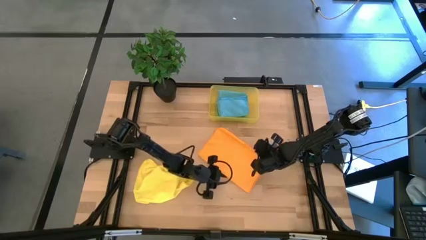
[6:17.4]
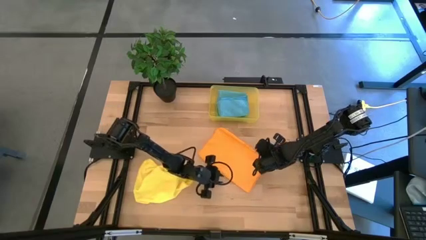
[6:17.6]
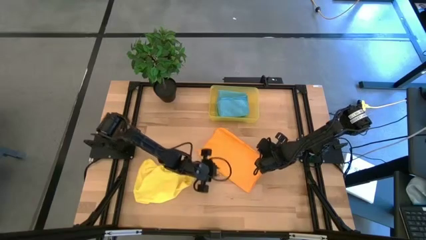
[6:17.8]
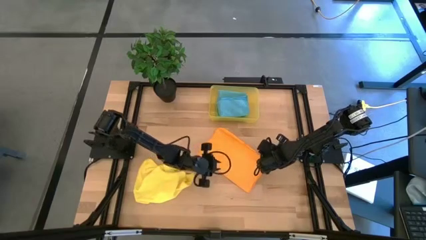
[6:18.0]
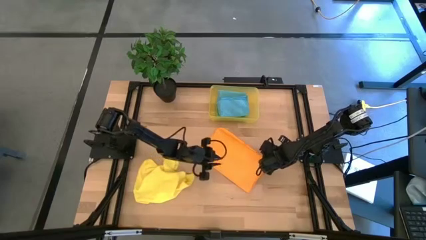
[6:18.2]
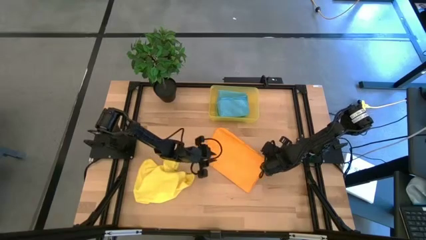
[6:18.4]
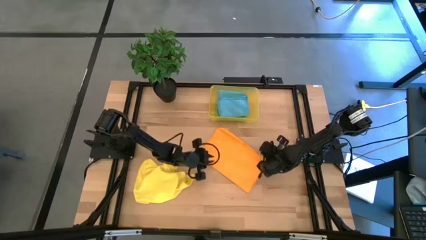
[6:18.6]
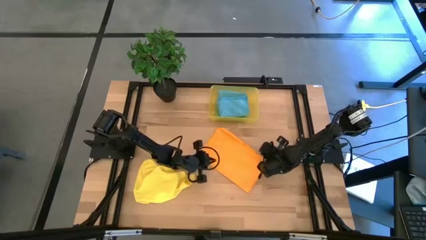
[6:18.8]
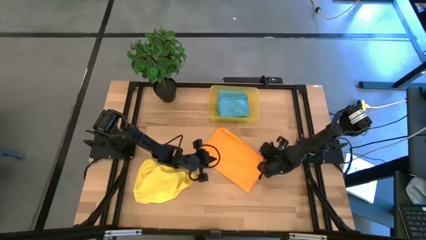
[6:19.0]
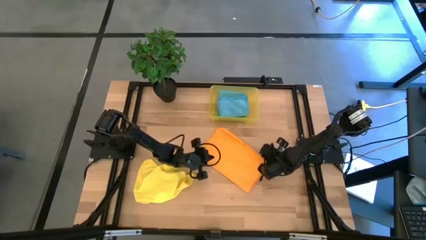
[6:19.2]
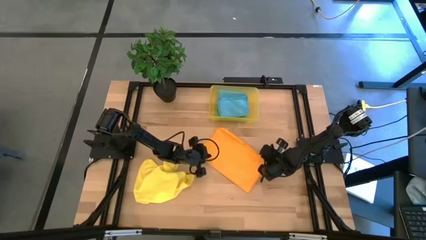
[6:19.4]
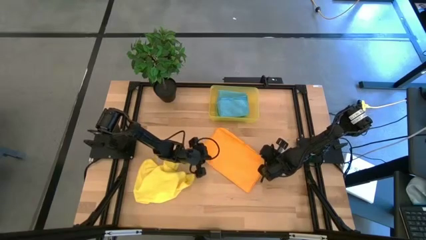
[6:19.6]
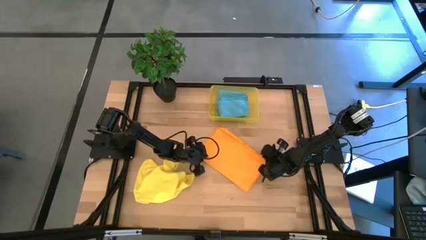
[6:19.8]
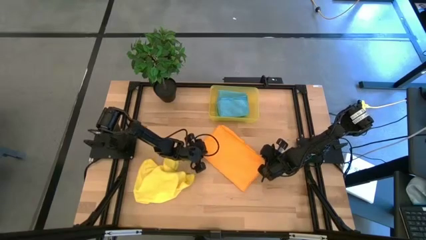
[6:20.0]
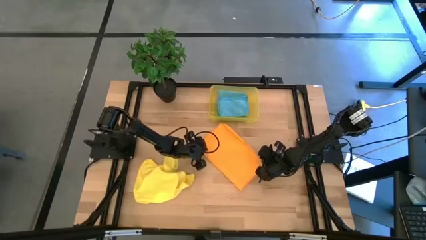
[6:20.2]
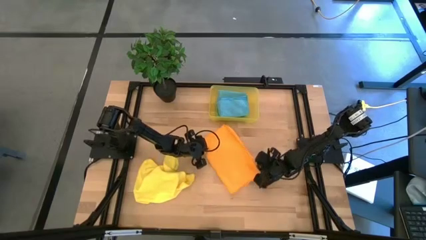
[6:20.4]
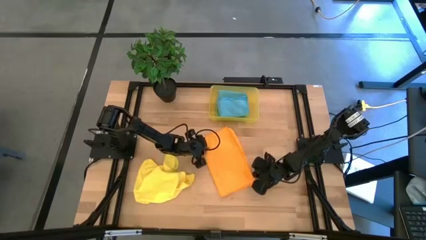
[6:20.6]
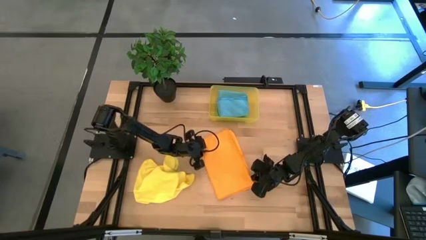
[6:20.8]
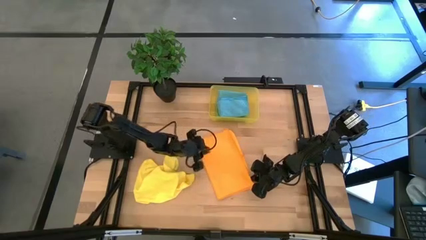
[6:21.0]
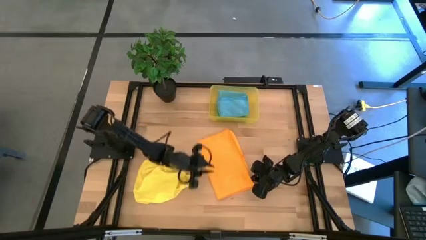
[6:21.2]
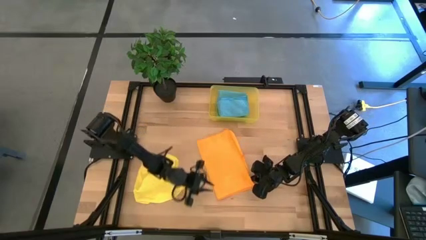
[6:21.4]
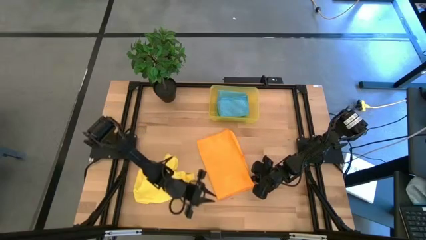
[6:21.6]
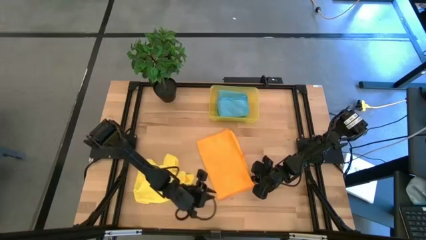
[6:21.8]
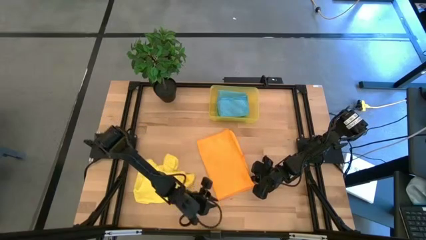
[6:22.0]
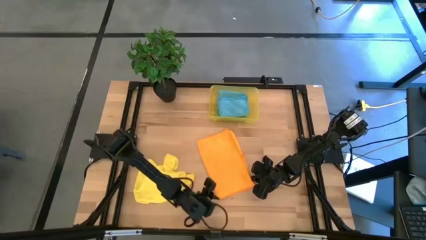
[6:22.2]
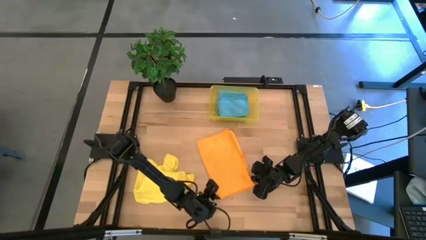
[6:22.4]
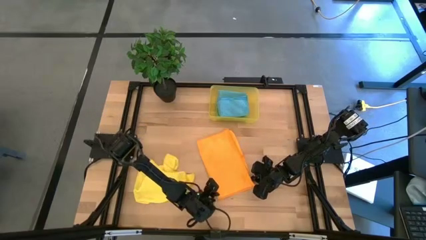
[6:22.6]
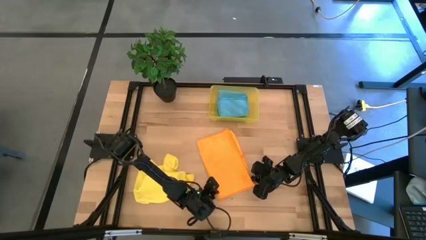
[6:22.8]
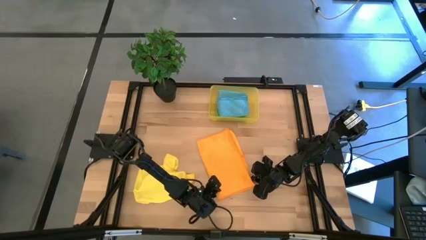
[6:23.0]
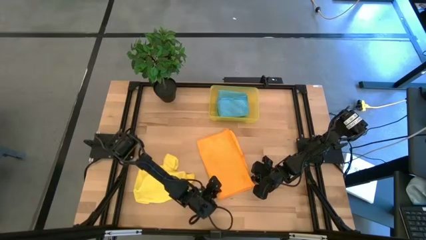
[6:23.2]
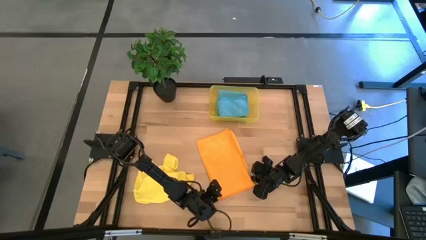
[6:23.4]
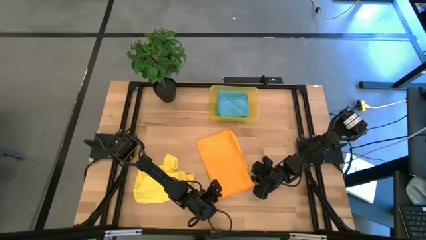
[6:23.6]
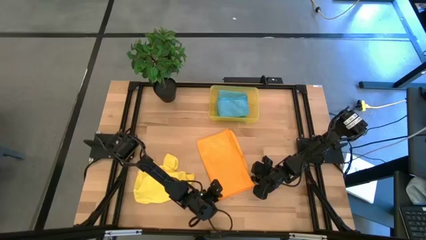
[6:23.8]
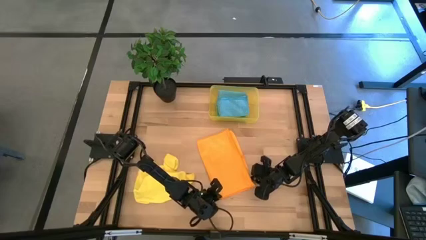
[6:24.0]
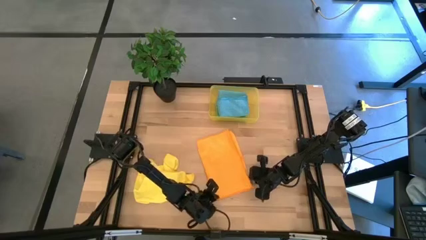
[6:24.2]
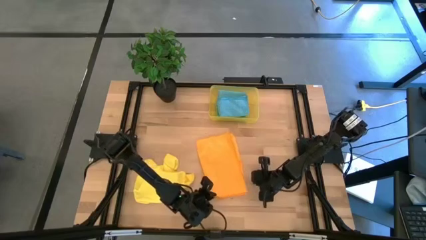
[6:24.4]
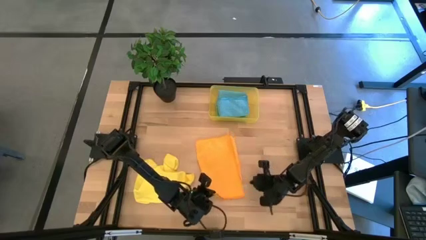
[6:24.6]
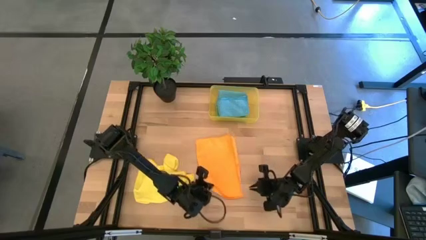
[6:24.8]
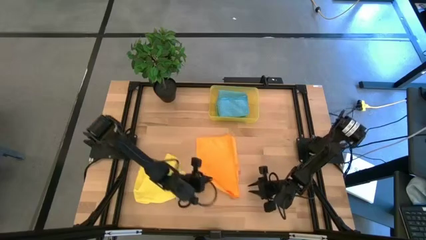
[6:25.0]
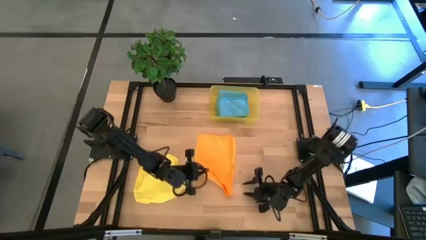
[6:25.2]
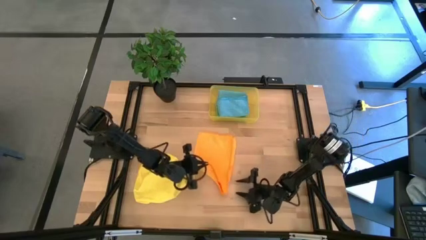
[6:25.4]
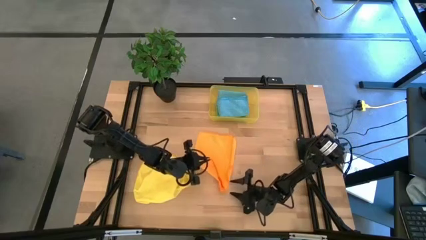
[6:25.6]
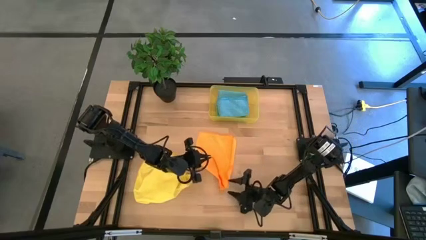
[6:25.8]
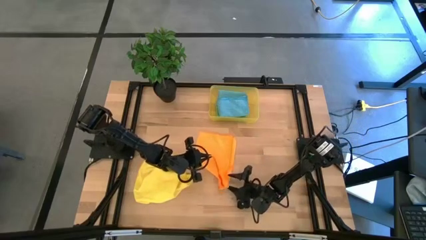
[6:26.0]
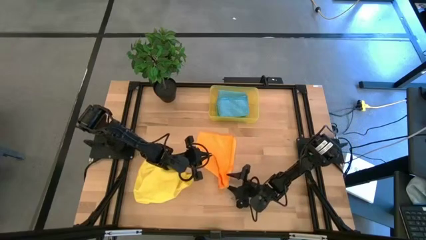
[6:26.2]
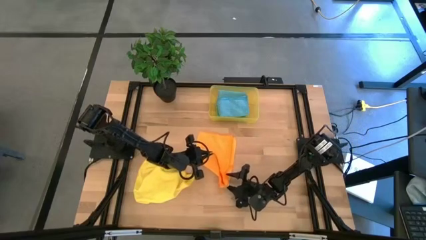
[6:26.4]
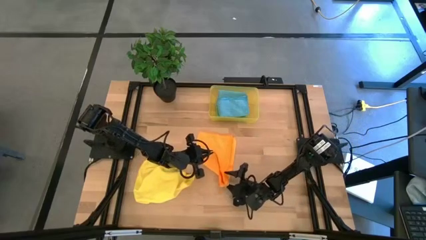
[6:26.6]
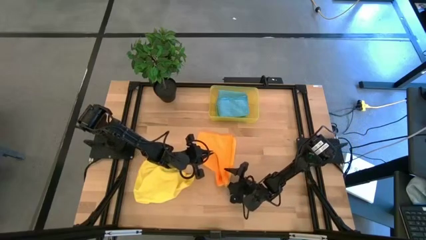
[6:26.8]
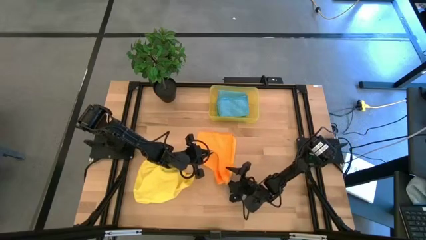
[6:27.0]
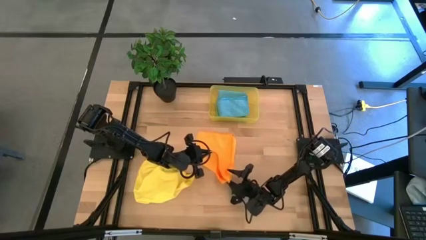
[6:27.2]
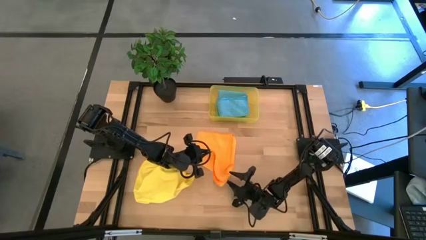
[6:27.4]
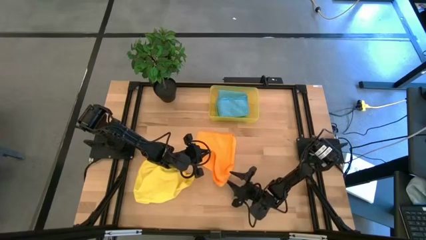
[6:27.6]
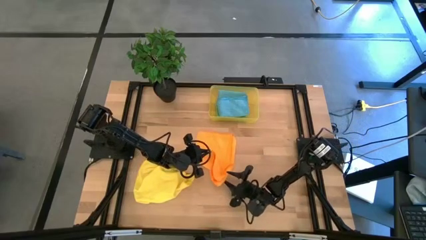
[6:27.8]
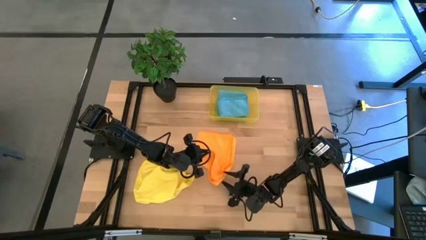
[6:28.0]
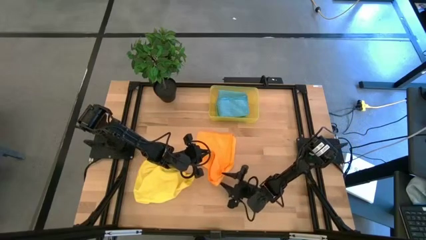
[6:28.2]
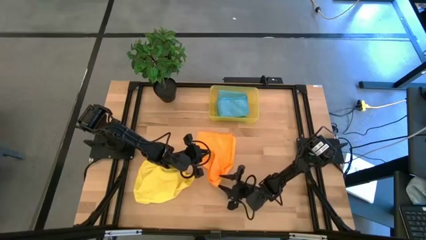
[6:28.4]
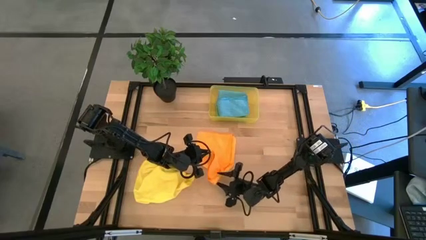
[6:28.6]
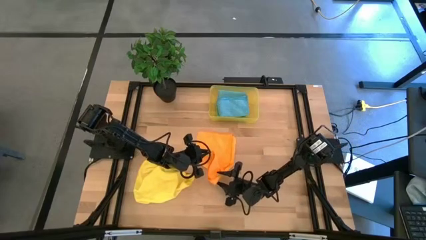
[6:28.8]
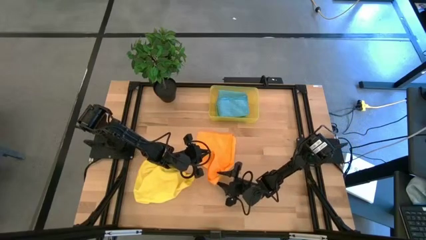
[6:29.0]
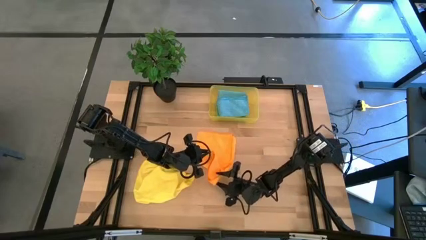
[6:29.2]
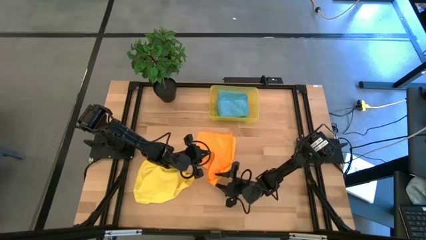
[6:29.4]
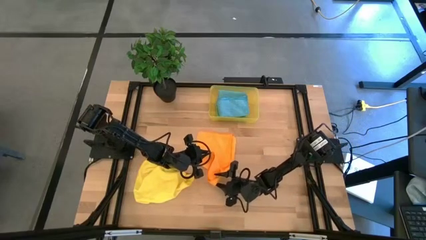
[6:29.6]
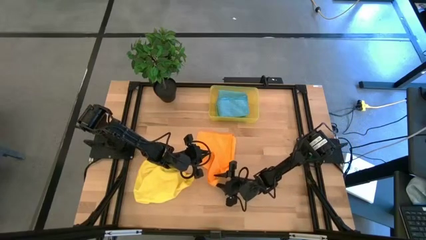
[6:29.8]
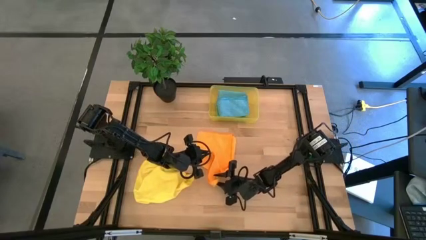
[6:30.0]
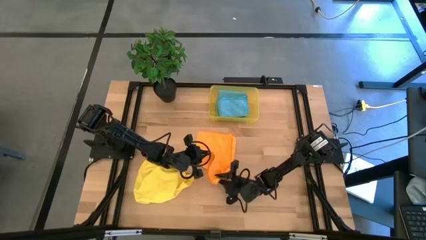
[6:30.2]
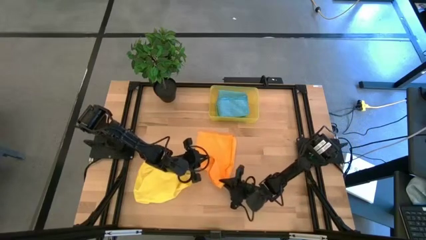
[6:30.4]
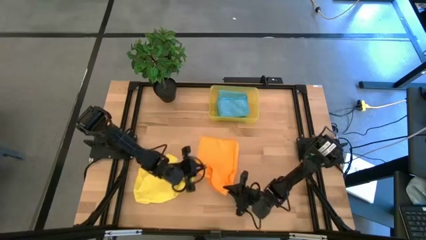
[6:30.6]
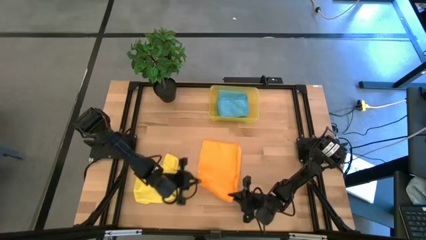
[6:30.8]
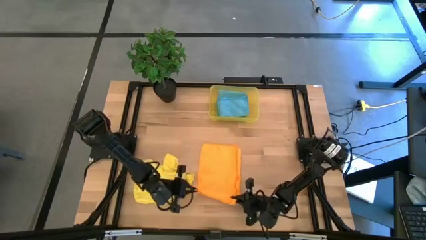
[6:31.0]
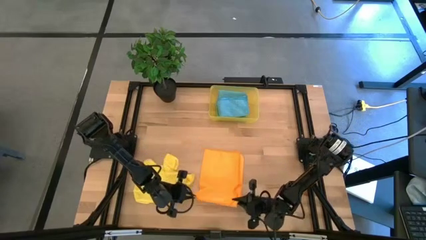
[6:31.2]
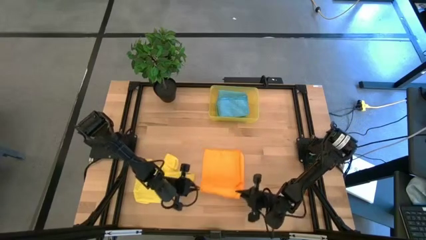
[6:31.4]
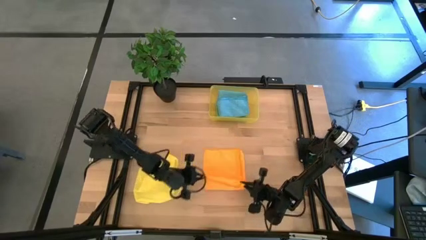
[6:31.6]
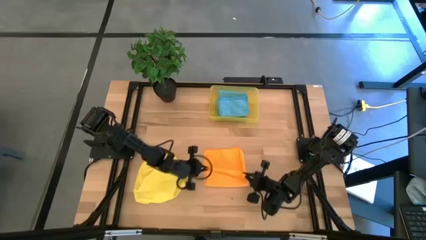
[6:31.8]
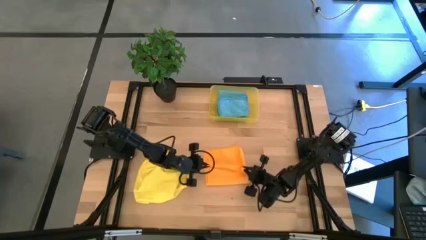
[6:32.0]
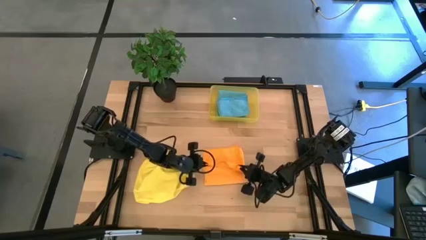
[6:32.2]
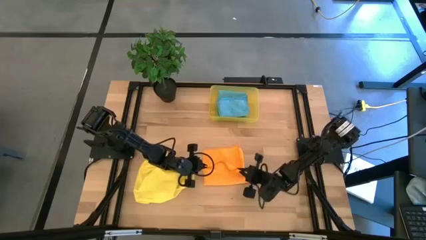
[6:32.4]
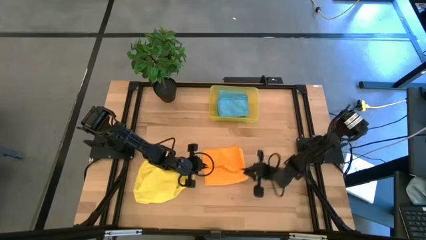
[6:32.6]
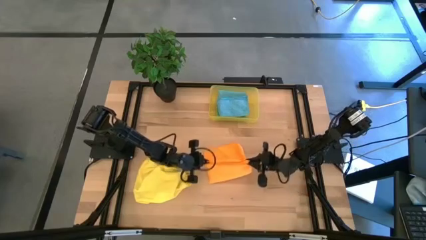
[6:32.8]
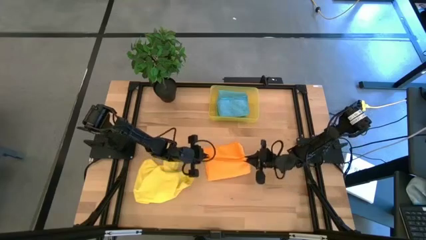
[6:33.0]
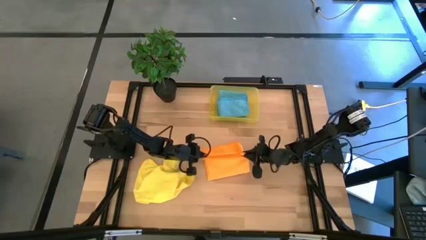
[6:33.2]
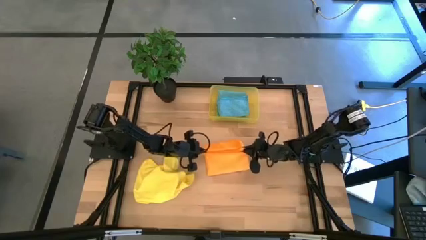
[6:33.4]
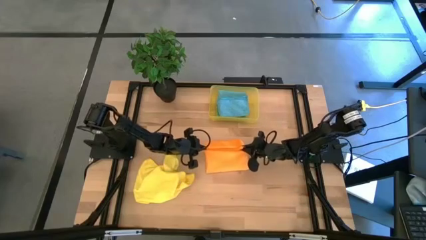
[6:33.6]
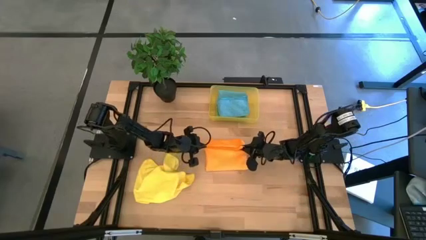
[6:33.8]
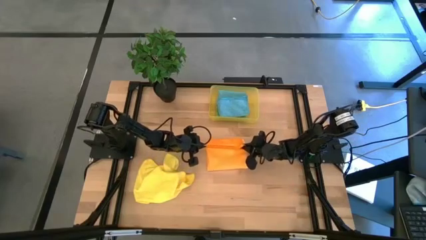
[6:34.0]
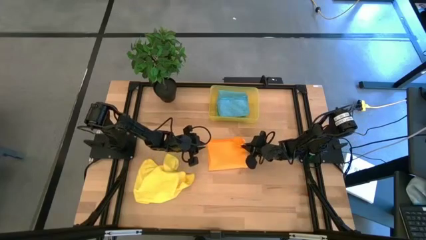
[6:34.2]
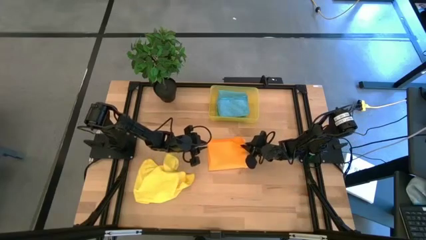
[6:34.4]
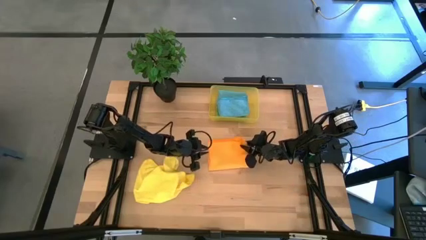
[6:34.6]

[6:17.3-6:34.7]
Task: Fold microfiber towels
Fold the orange microfiber towel
